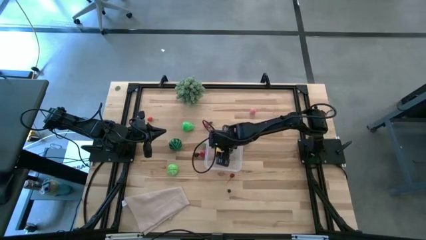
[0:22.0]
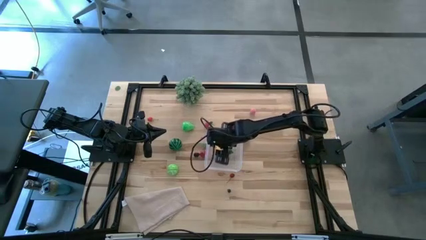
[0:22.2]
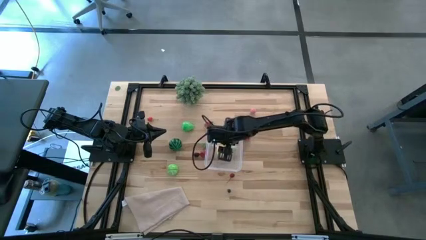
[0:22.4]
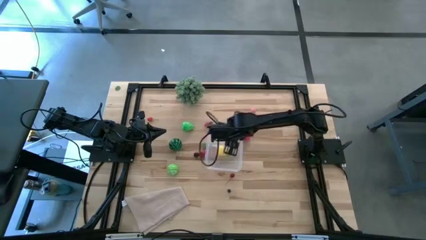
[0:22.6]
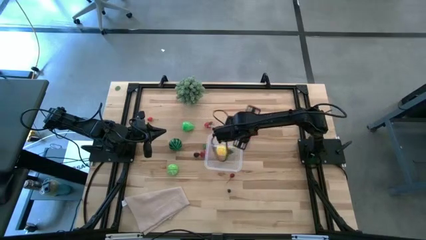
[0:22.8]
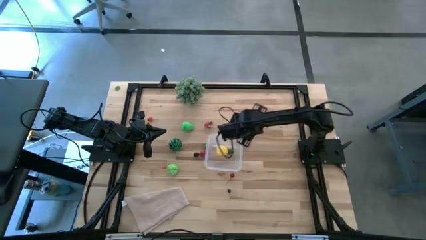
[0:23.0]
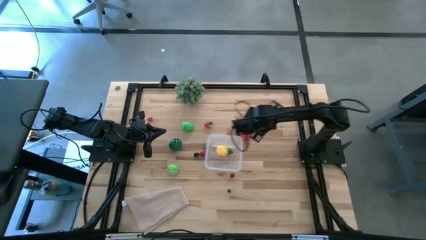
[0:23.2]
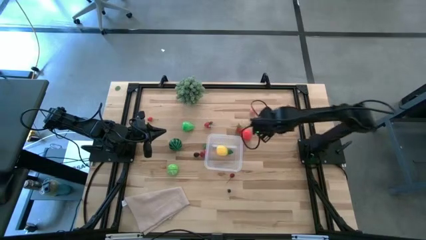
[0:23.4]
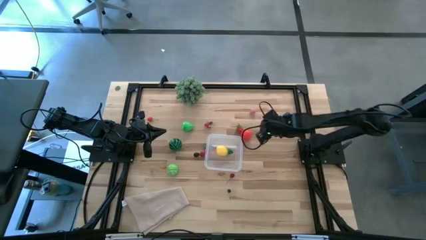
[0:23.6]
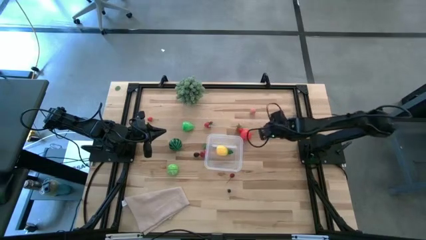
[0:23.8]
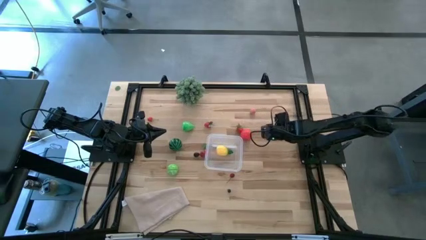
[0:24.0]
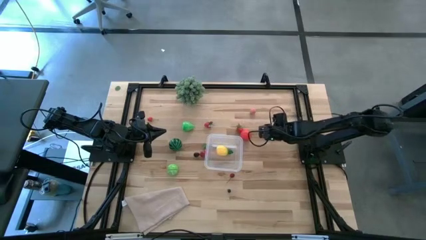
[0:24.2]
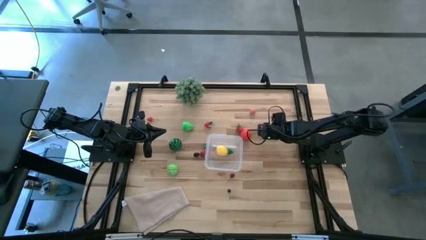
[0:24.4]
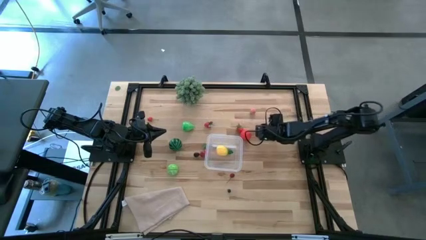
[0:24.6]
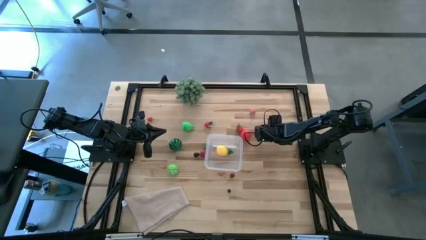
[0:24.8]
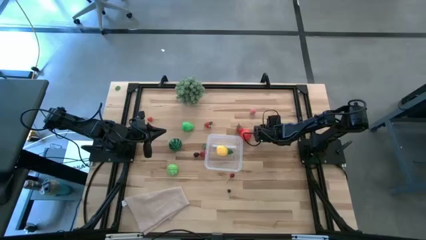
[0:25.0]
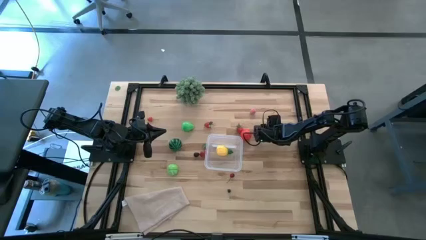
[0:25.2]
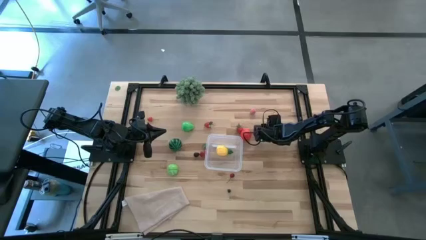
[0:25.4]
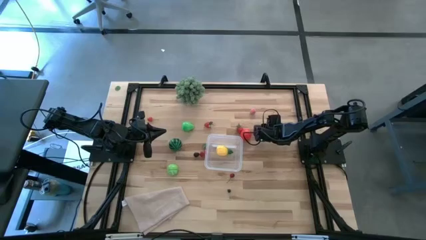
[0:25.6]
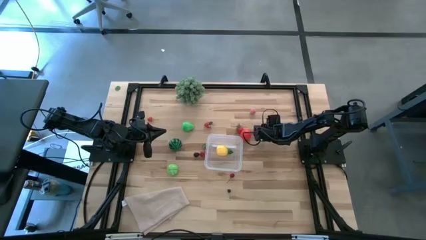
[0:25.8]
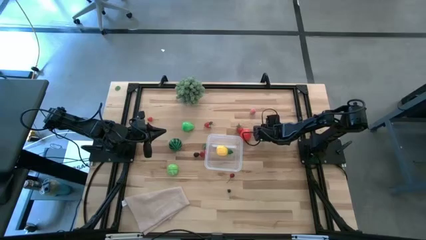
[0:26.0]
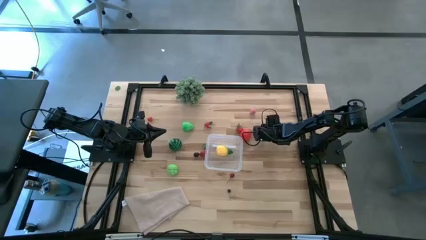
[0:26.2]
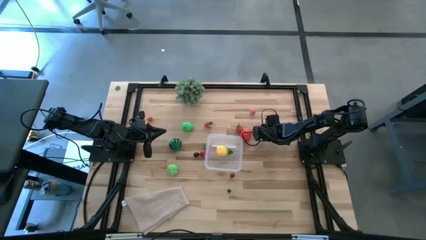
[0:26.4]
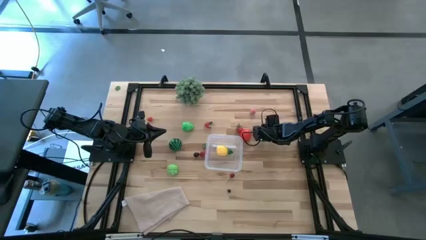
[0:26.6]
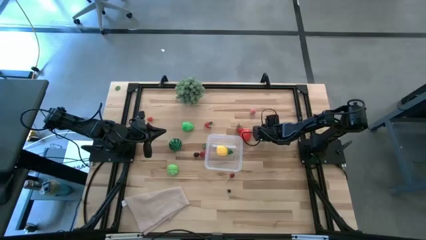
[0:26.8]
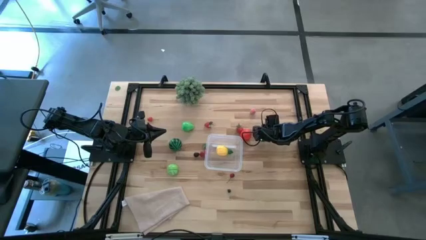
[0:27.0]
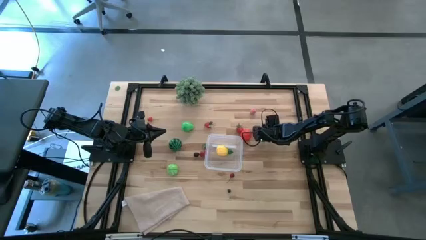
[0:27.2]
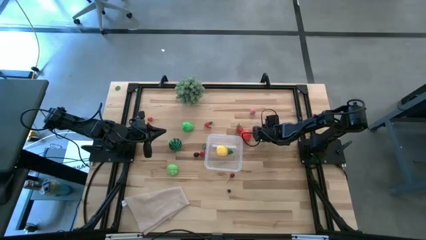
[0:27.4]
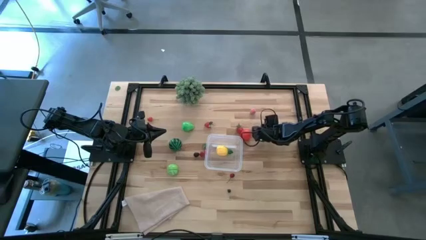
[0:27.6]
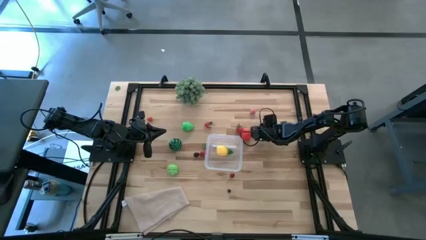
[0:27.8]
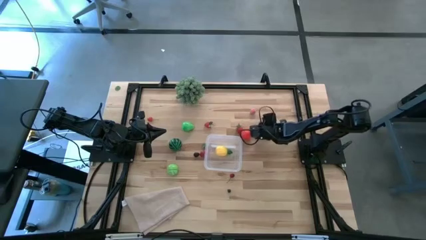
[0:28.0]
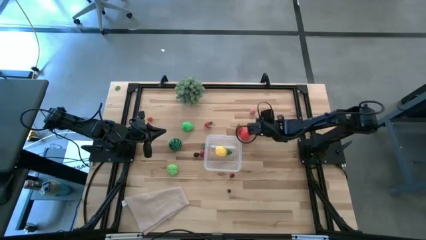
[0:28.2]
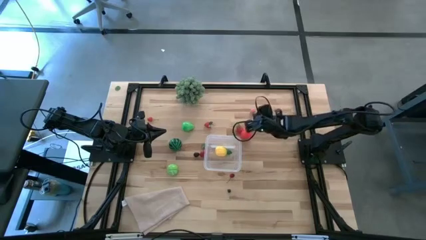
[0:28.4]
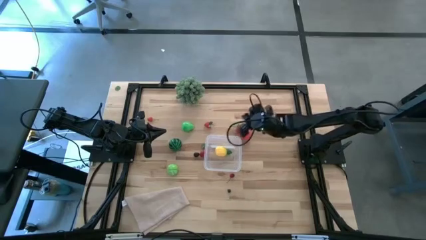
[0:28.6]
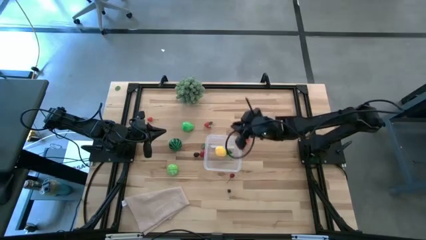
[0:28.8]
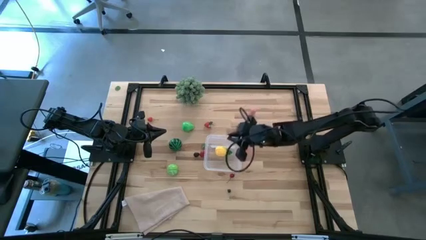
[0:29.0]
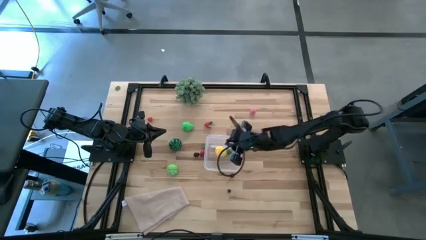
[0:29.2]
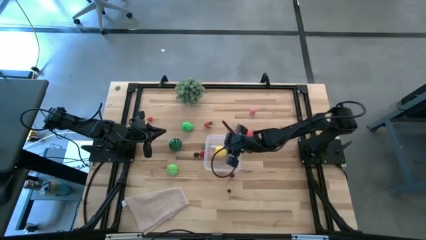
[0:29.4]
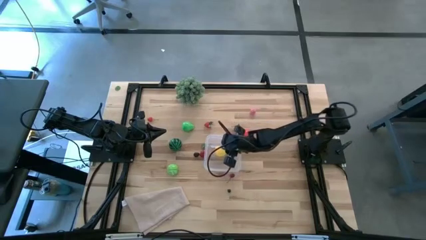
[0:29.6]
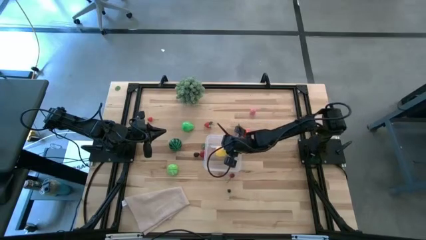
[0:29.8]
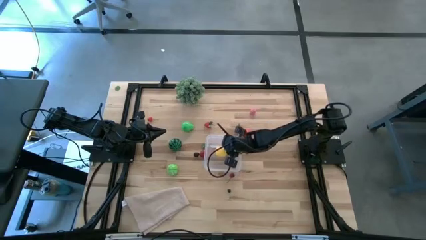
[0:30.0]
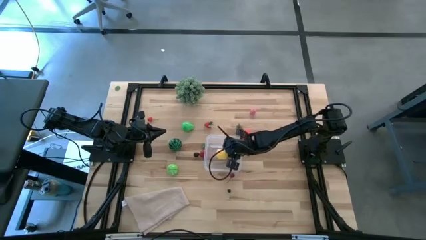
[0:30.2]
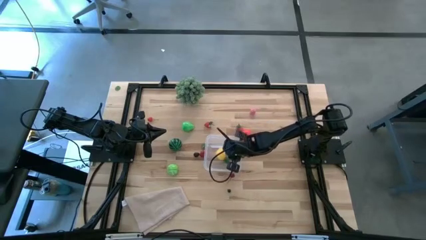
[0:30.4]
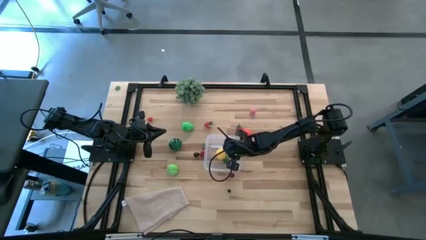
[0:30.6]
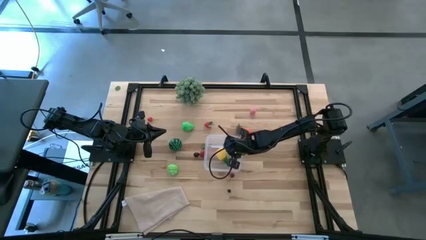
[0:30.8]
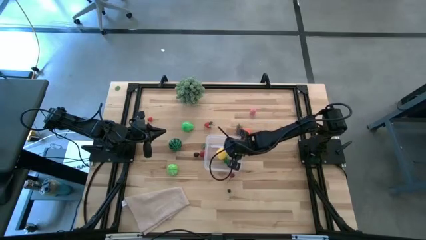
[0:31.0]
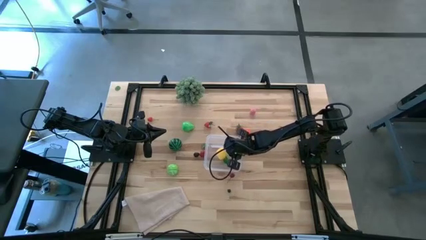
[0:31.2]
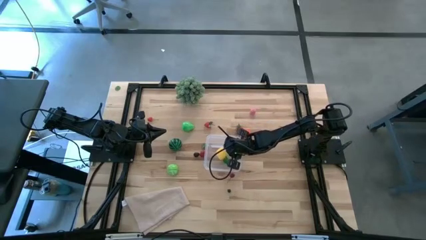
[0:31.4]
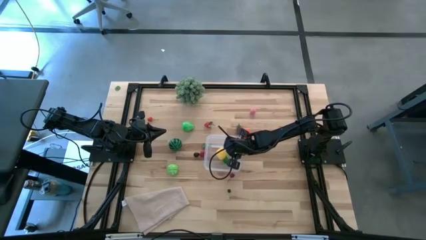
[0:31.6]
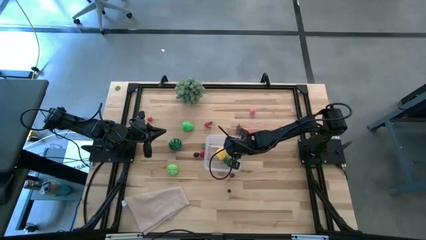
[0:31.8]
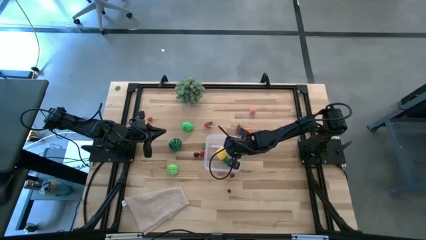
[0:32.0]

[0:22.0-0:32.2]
Task: Pick and placing Produce into tupperware
Put the top blueberry into the transparent bin
